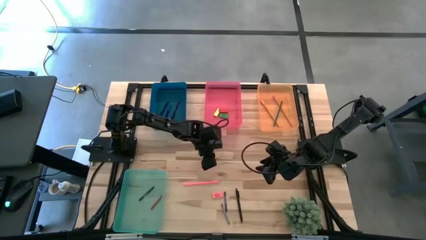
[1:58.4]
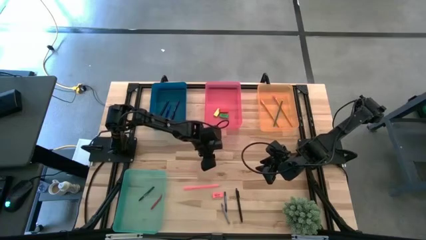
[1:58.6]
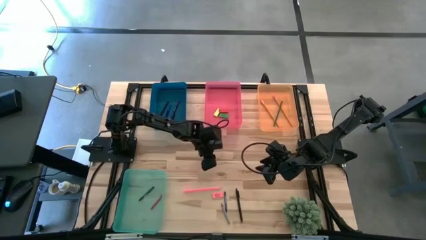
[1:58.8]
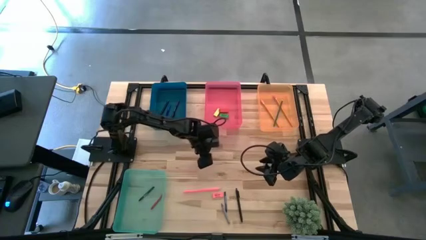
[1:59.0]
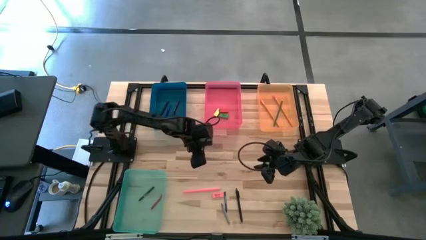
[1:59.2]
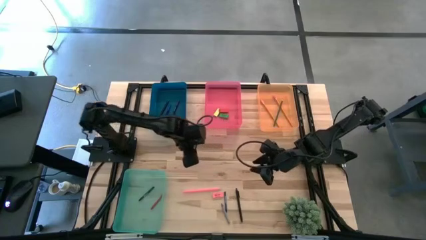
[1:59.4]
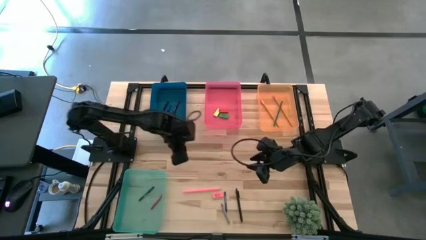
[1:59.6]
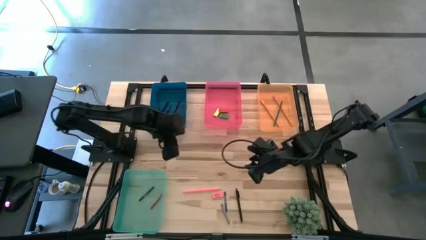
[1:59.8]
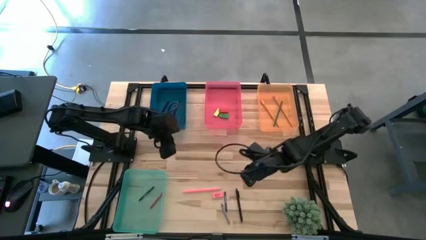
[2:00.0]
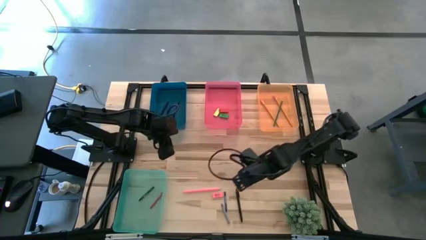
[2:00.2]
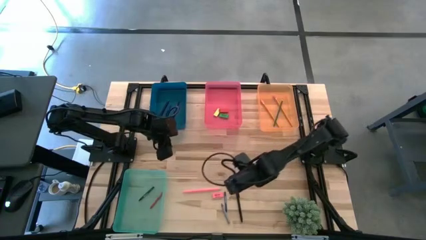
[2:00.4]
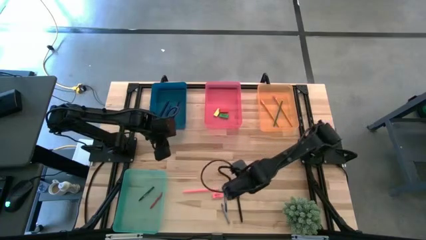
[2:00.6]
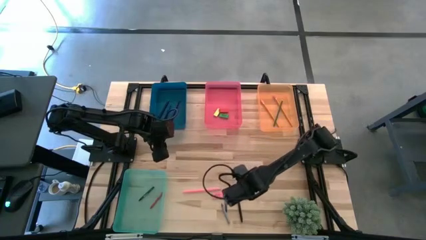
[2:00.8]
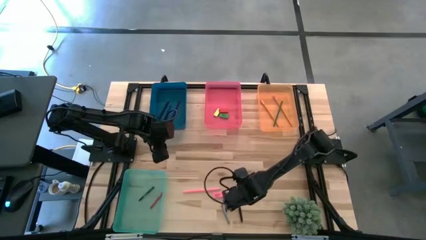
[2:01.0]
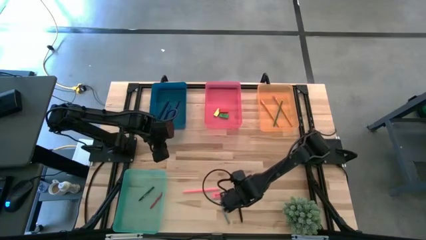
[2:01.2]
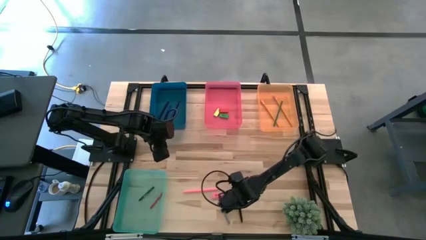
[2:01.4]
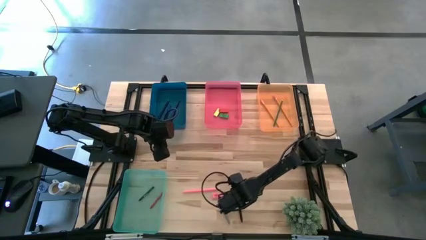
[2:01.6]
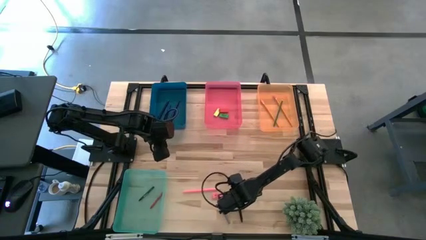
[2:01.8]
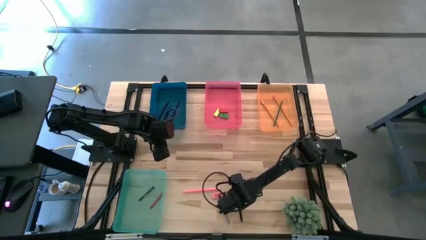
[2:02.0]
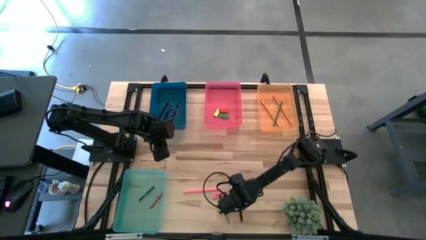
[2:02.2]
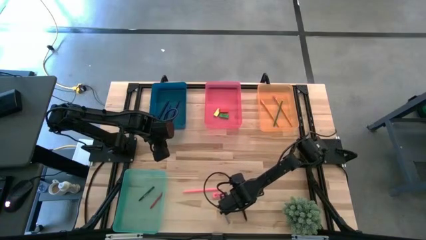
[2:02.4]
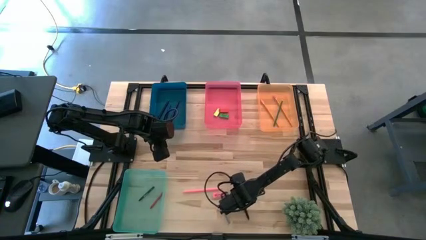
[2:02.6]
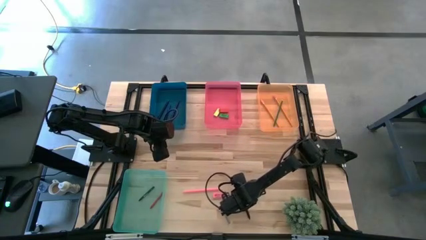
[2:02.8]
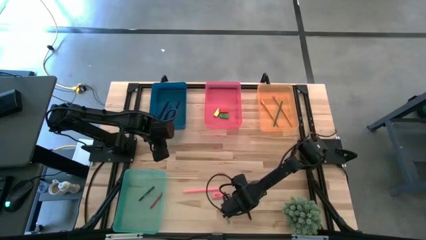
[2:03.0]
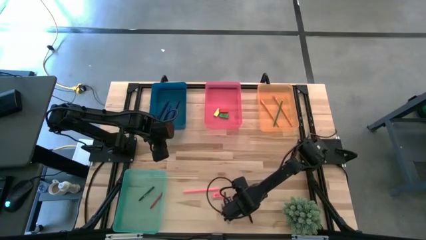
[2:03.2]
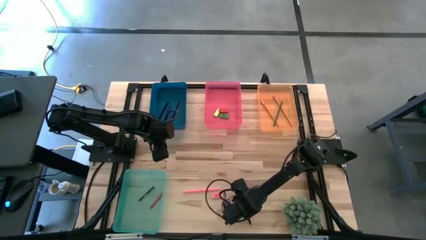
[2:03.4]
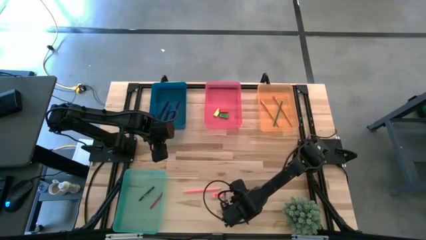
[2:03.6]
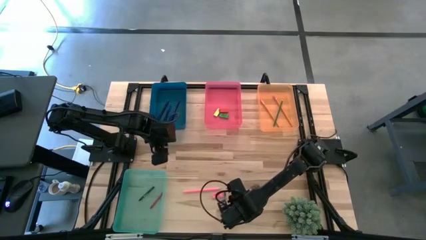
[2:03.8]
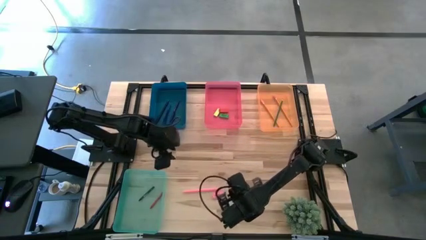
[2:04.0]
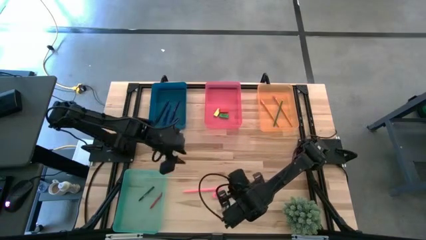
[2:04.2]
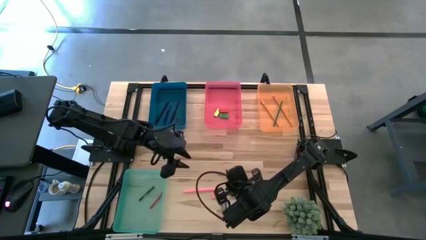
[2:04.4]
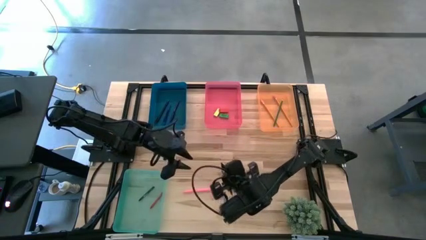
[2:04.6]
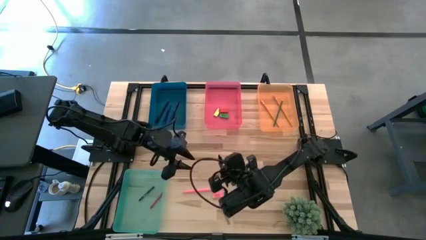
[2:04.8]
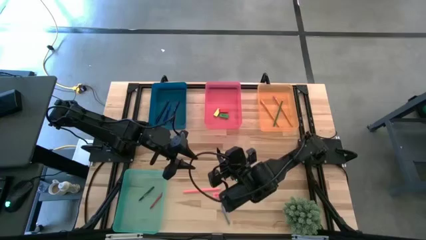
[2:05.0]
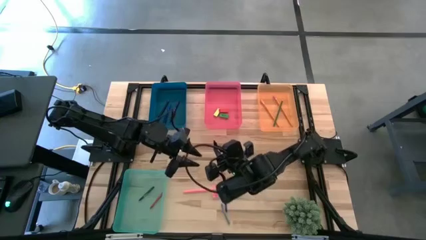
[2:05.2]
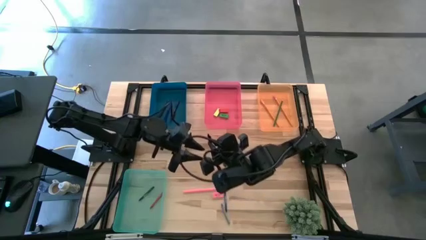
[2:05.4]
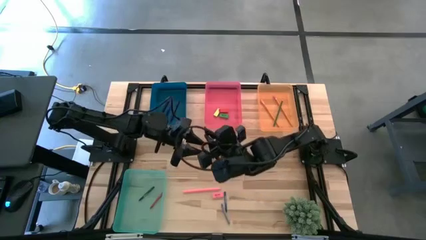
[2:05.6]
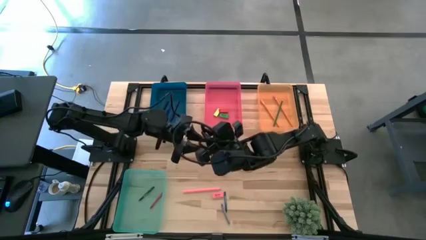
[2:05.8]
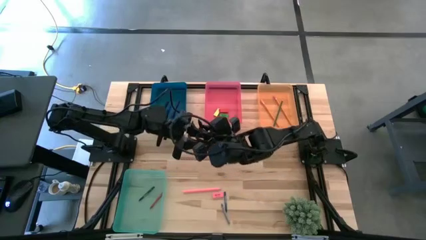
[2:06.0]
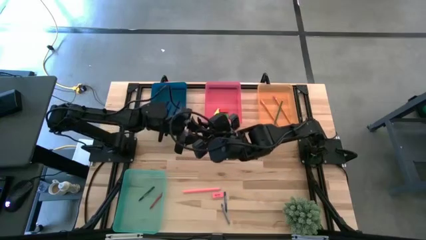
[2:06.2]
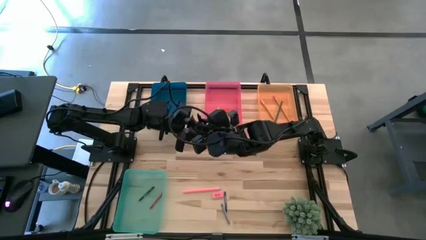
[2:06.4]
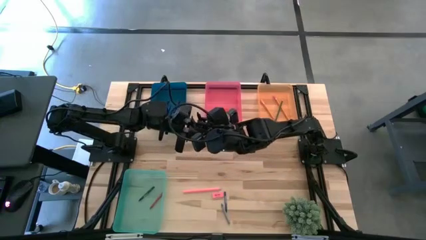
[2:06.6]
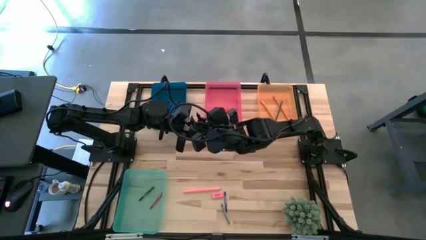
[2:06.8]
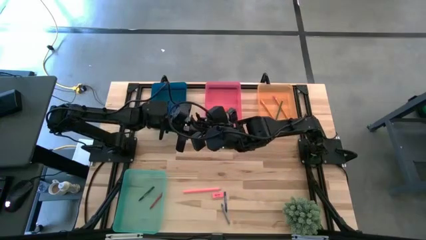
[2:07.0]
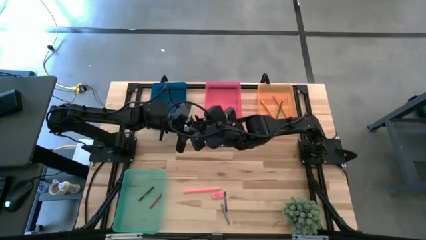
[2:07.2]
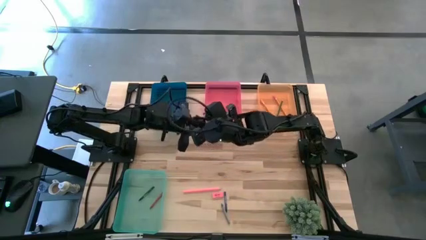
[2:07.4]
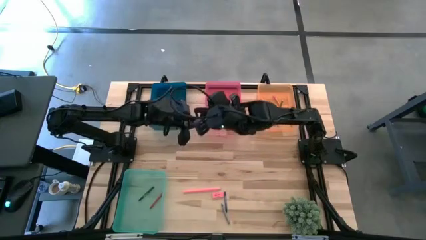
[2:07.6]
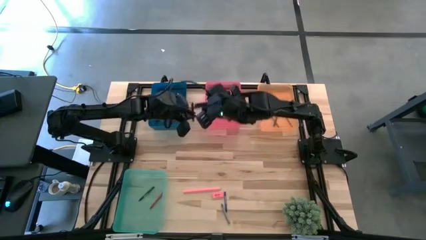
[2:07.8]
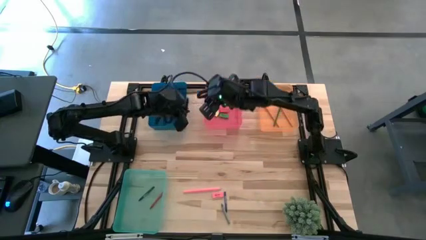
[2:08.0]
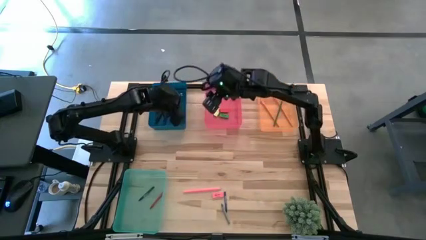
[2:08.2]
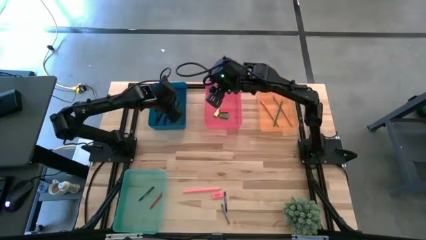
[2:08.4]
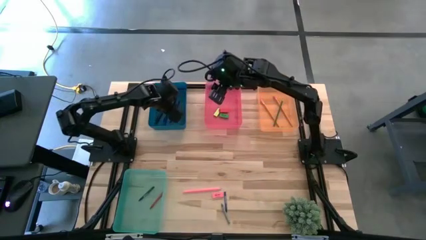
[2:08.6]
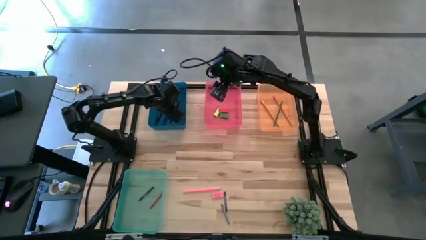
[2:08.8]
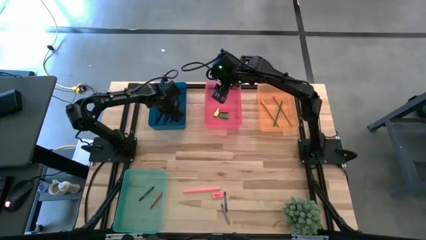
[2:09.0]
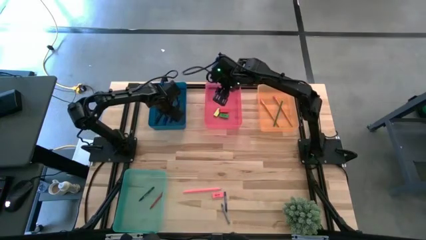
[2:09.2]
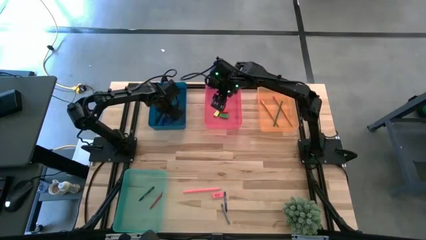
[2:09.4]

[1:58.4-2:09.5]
Task: Sort crayons/erasers/pens/pencils in bins
Put the black pen into the blue bin
